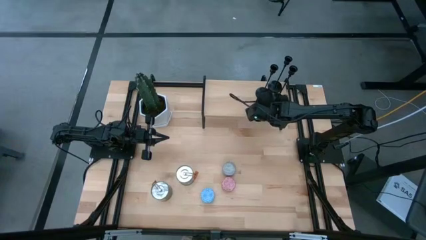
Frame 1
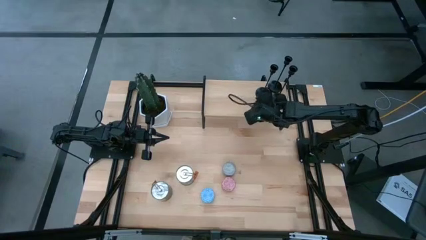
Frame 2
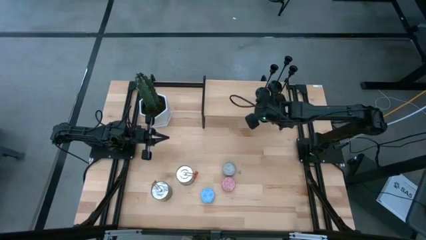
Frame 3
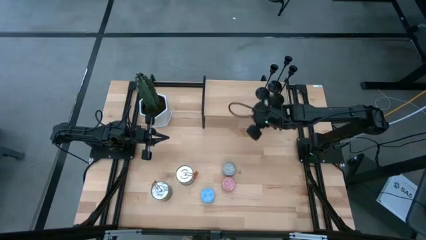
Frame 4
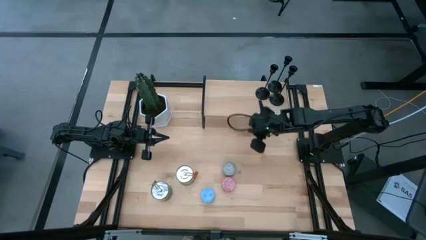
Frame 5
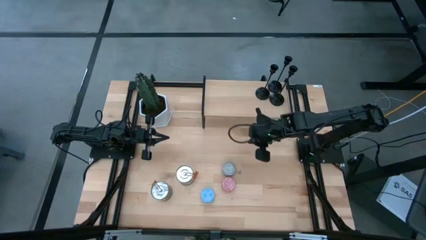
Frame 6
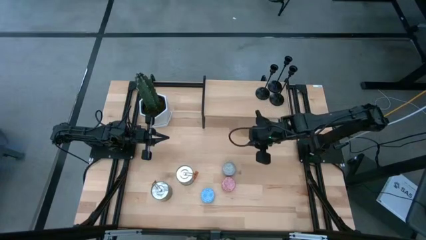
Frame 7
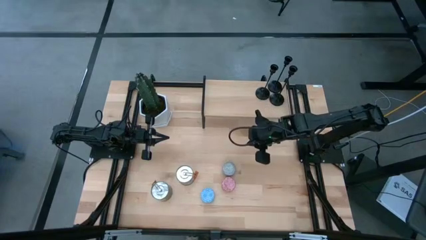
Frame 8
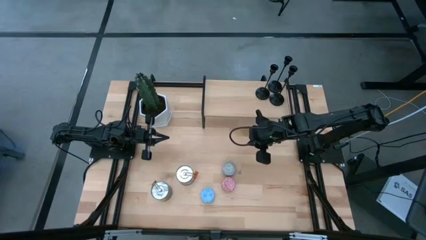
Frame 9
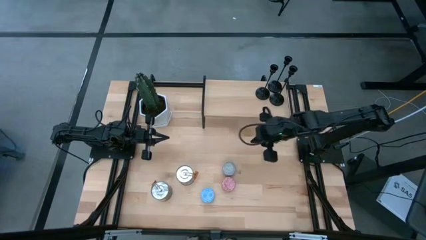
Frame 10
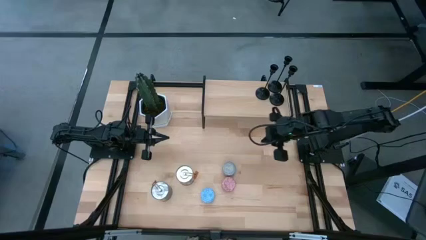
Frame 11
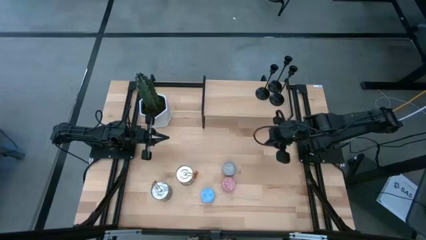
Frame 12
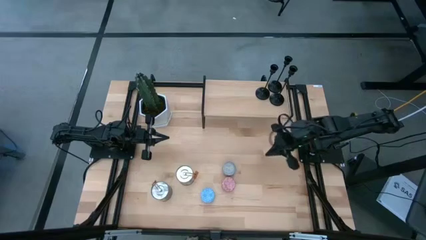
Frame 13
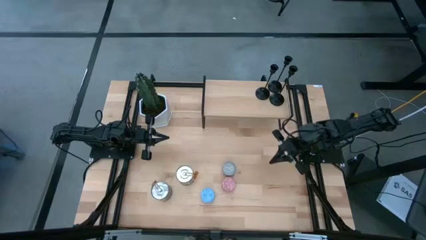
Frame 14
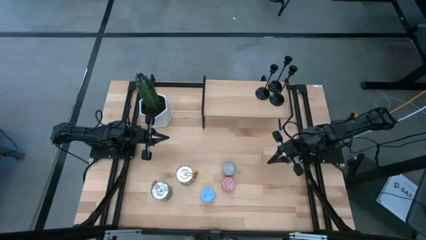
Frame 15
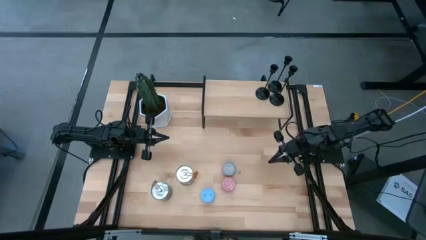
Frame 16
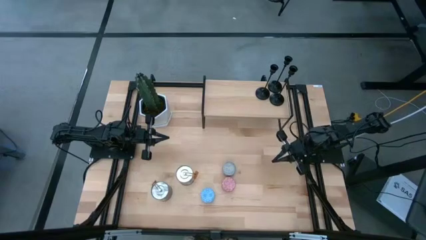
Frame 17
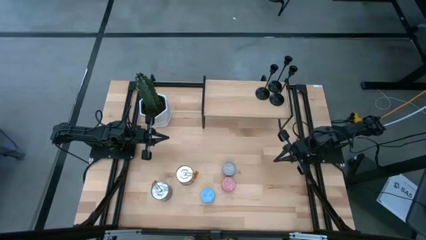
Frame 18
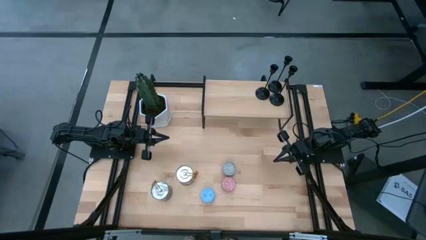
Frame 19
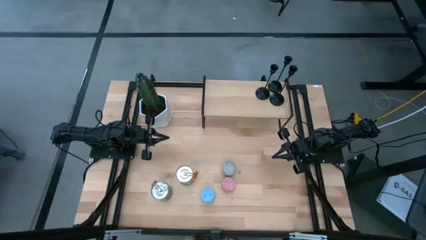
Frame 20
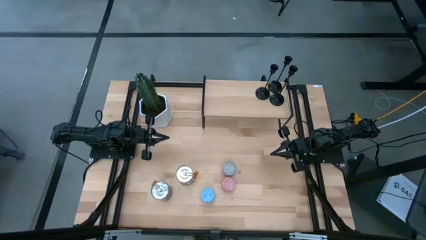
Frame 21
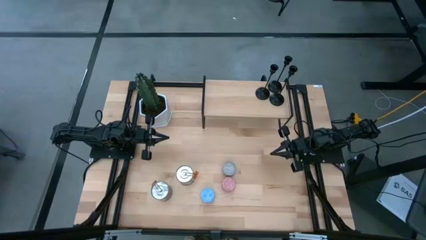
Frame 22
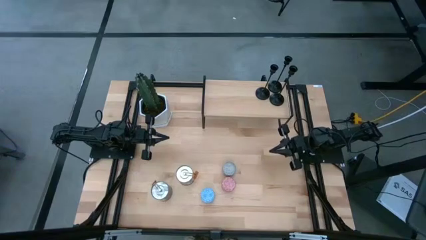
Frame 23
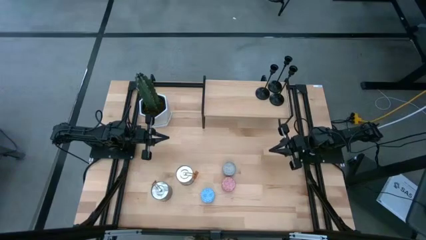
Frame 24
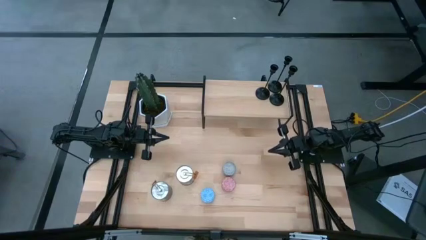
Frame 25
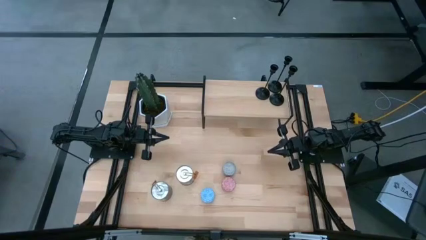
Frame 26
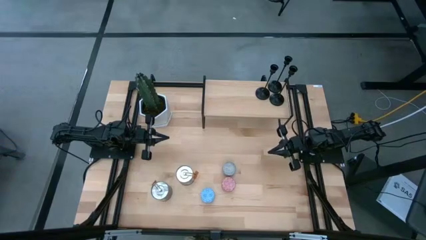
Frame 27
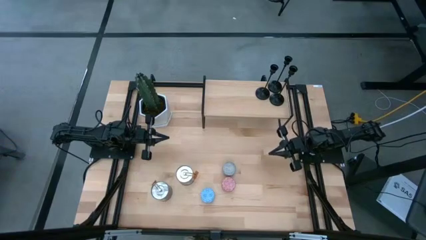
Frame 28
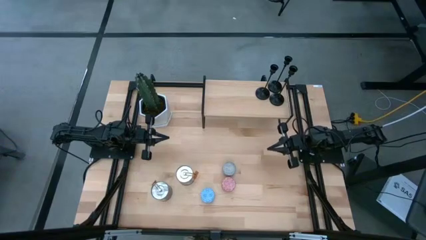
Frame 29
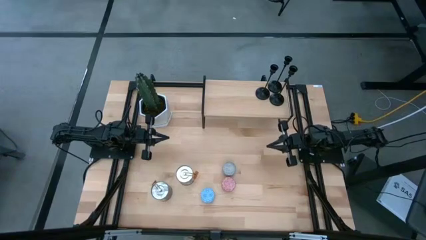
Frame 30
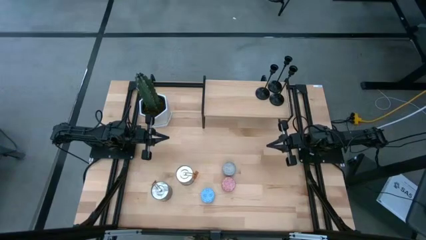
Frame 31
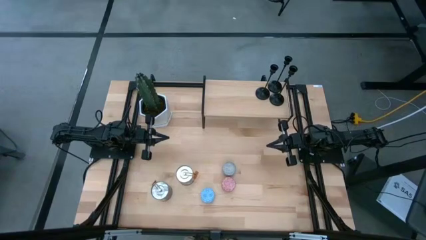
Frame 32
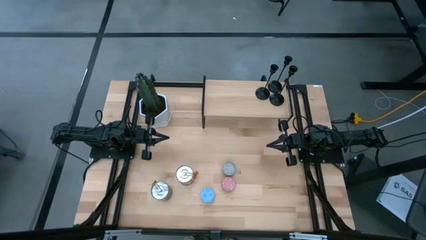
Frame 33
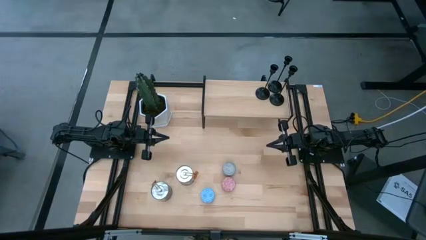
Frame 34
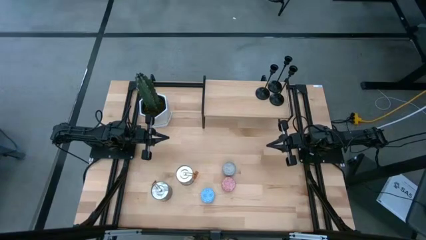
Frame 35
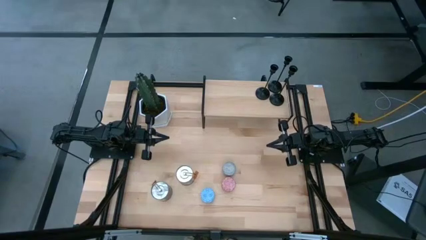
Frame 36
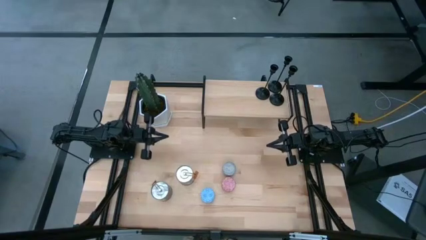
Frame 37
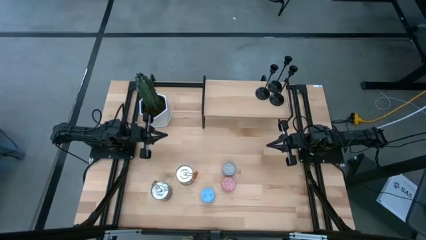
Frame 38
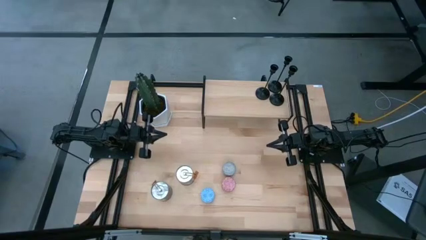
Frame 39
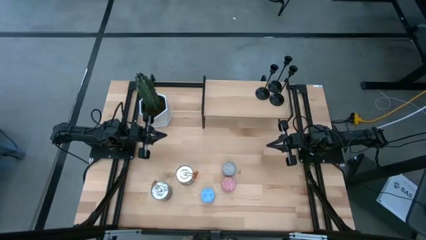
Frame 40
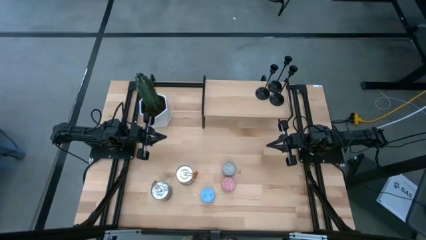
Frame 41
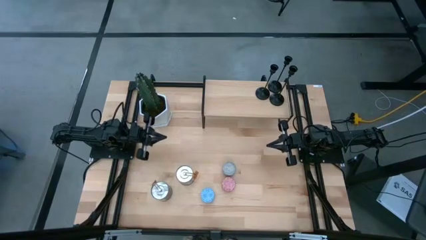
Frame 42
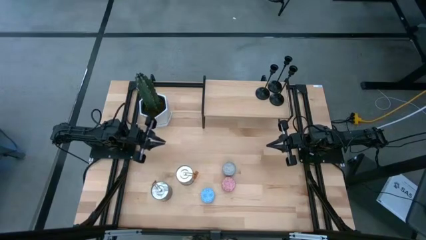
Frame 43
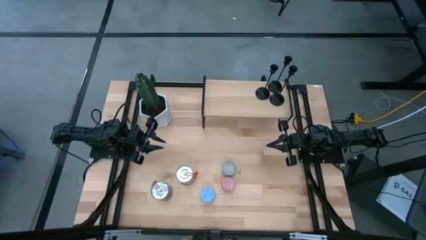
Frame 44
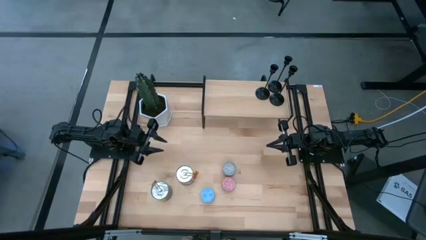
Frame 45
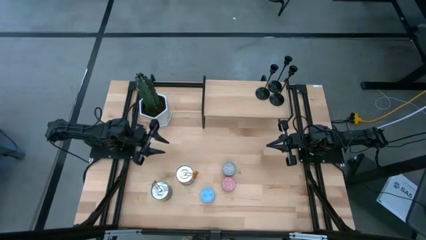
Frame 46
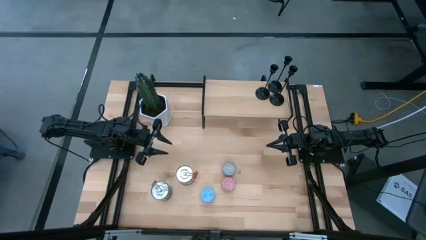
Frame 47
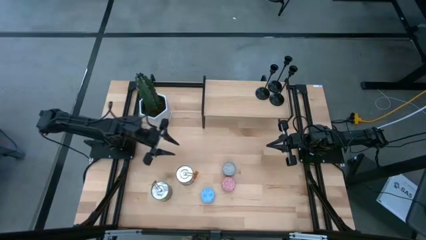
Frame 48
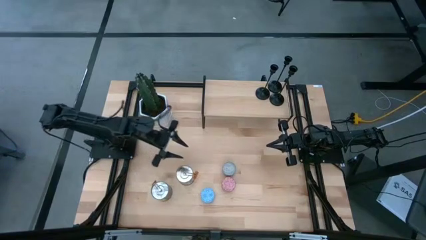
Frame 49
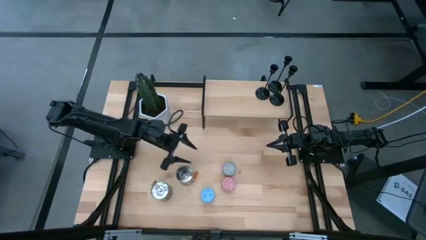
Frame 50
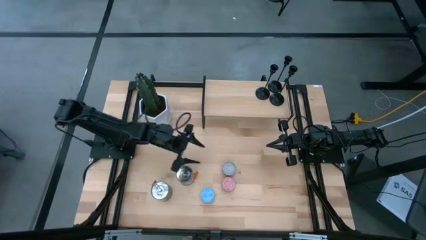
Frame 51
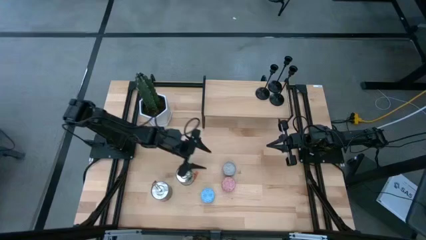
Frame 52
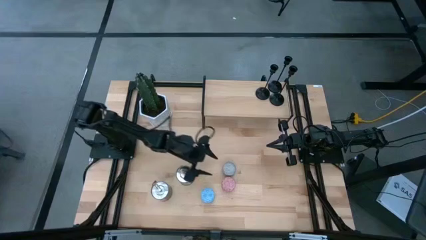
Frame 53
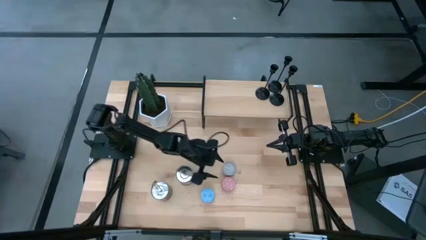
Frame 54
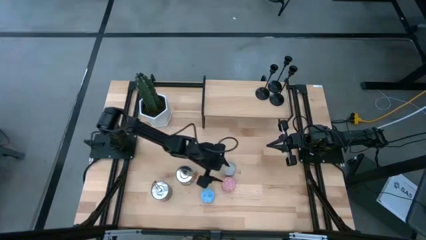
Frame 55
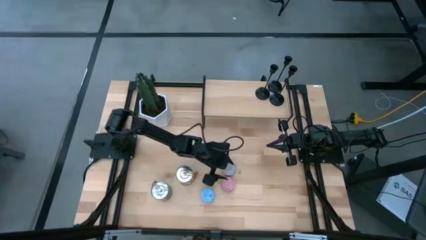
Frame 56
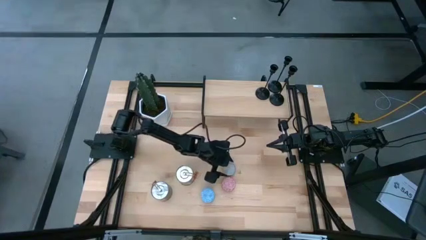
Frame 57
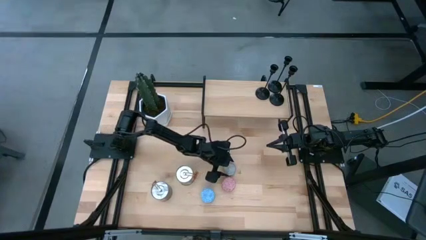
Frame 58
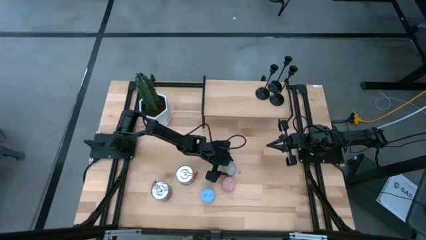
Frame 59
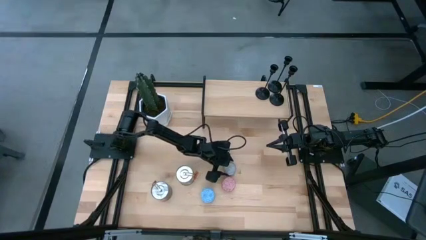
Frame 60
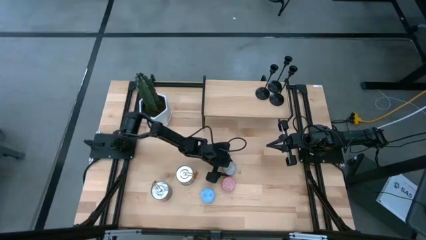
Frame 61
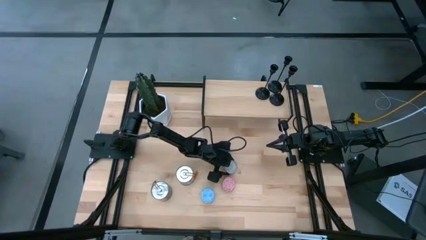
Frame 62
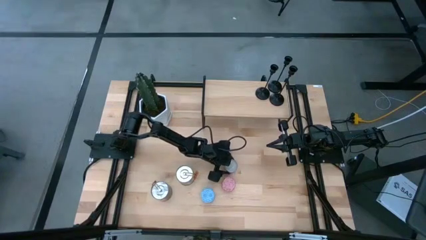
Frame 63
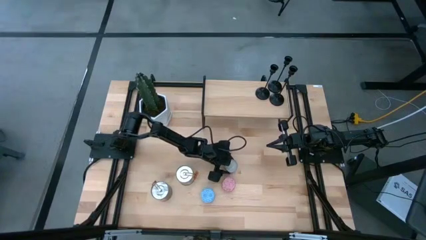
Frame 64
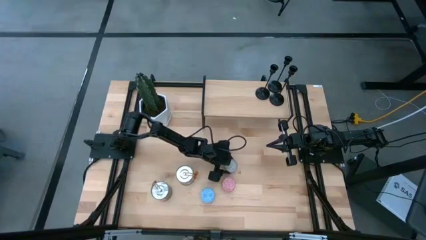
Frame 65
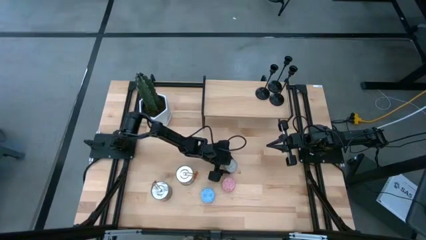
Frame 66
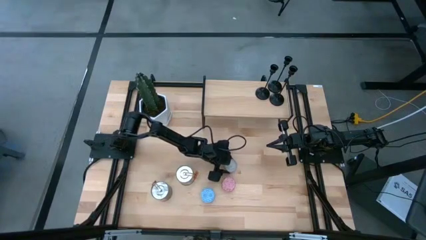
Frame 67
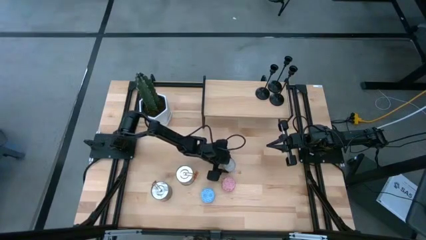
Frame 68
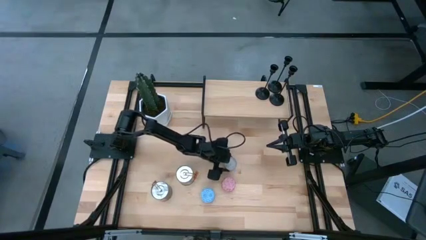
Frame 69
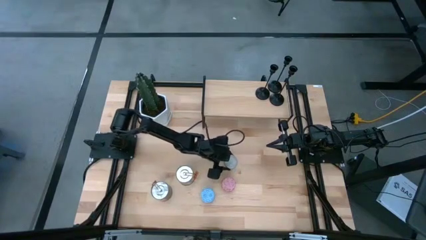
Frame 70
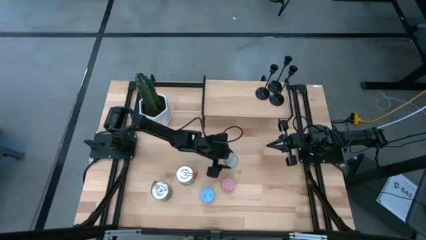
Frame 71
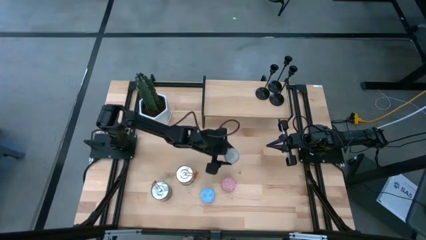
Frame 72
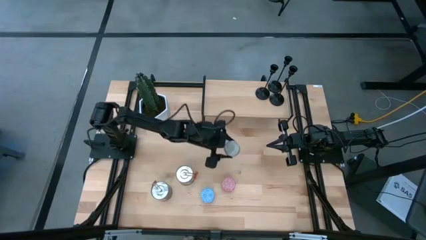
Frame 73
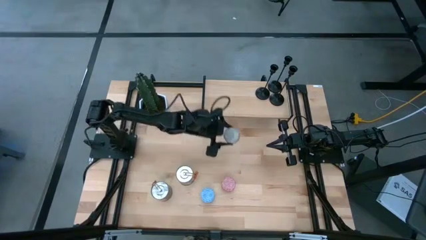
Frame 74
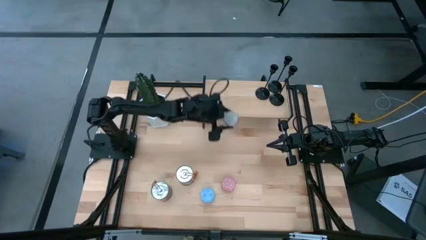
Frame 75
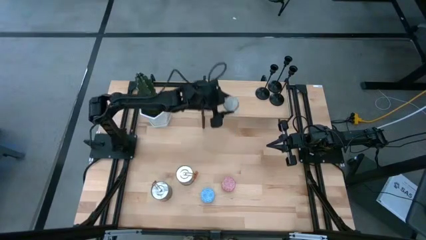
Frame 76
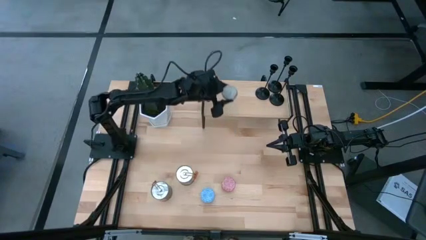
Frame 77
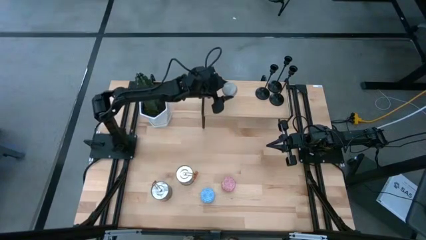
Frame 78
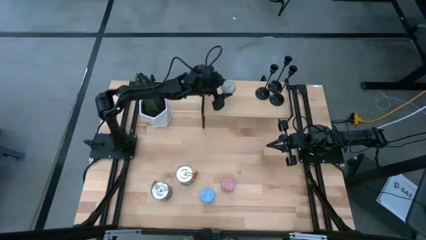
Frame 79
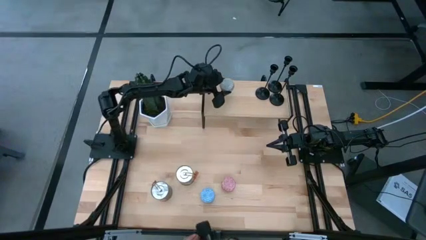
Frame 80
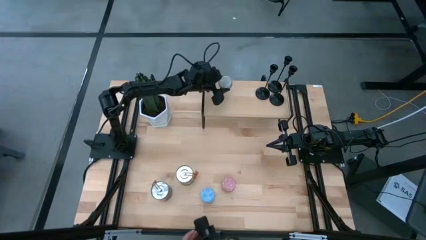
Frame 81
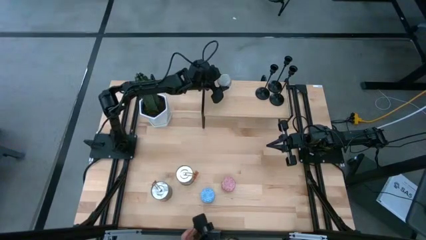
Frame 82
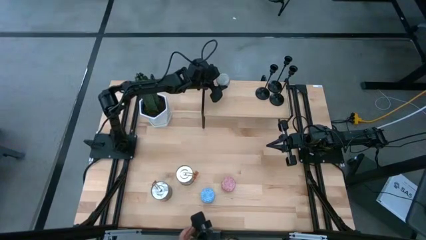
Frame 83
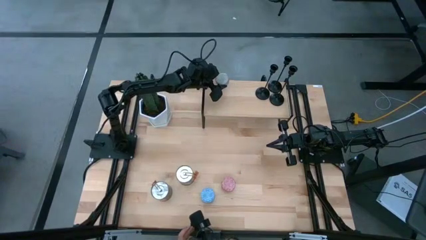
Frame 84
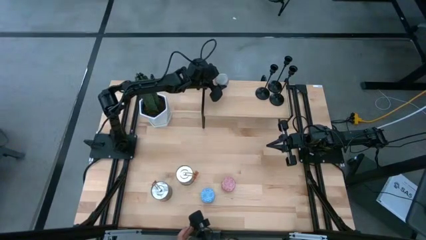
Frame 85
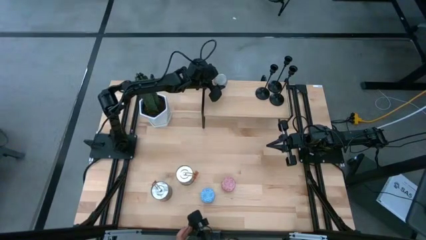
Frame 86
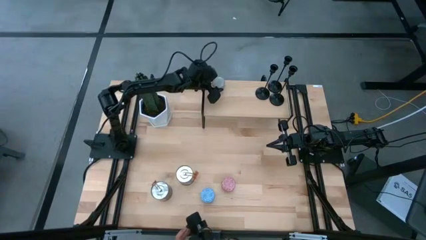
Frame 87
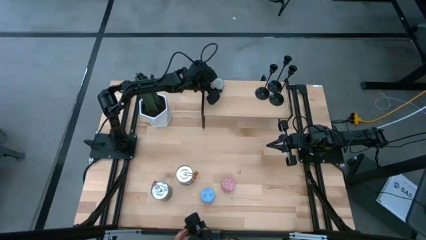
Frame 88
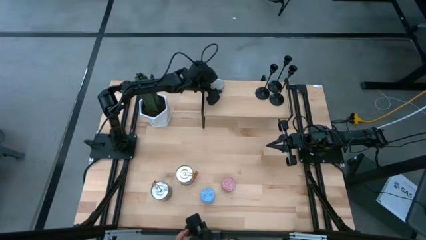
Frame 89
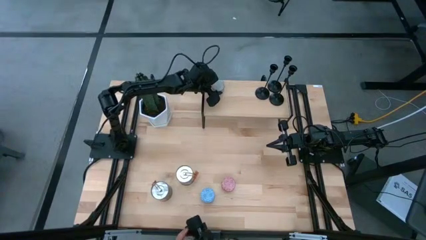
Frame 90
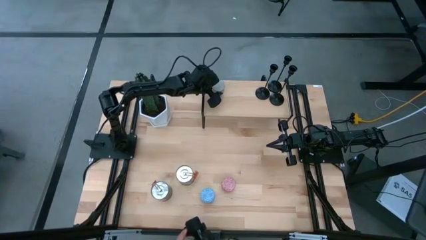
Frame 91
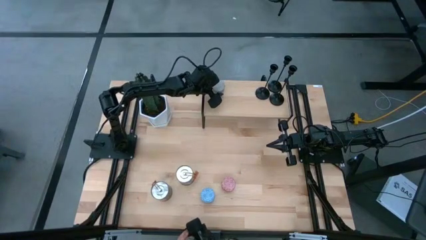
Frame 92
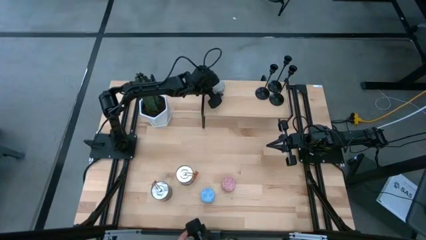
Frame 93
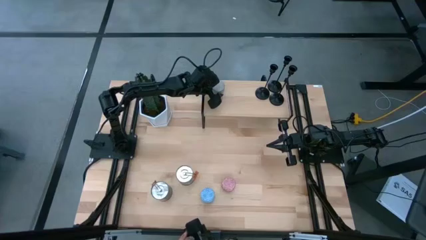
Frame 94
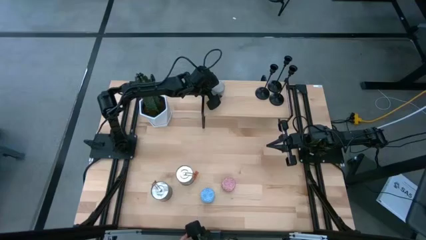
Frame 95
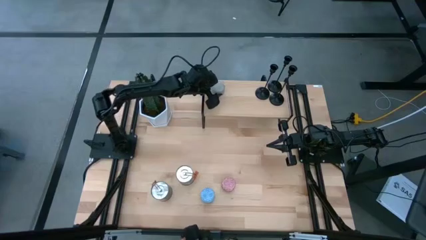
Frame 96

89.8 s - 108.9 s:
Task: Pick & Place candle stick holders
Put the blue scented candle on the shelf
